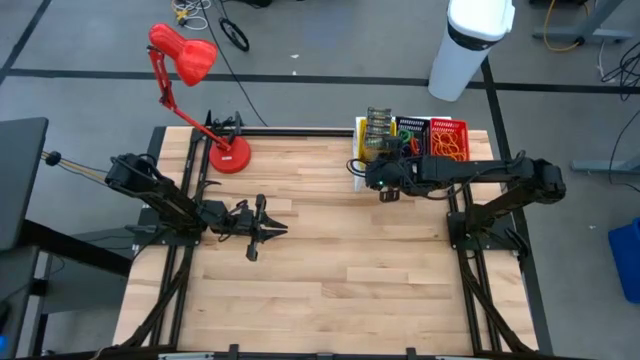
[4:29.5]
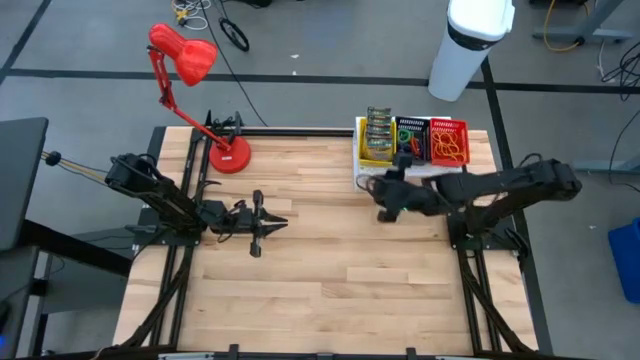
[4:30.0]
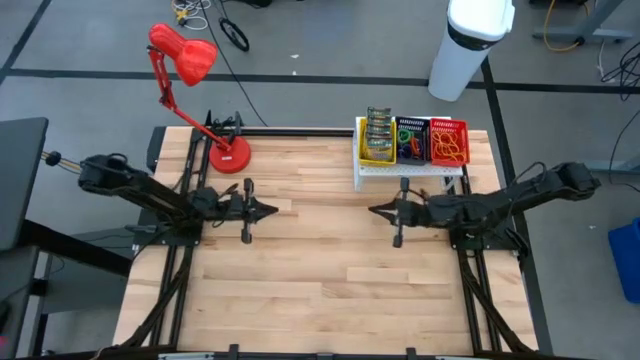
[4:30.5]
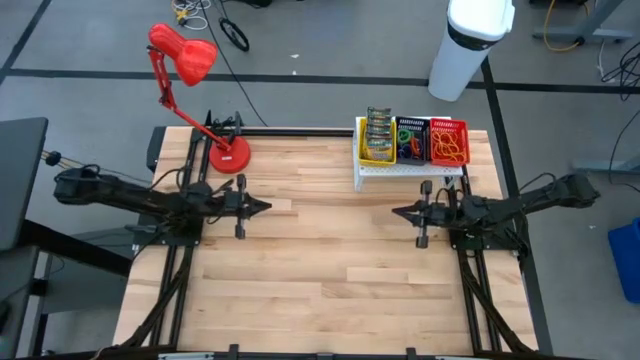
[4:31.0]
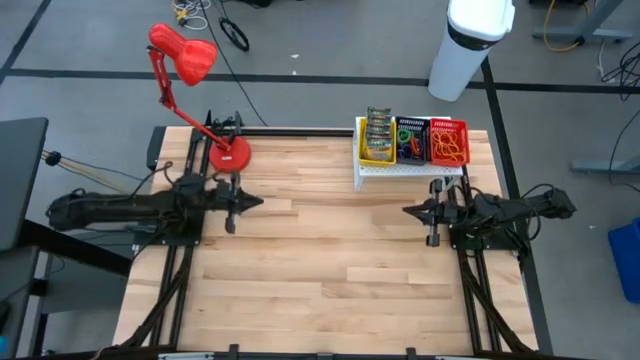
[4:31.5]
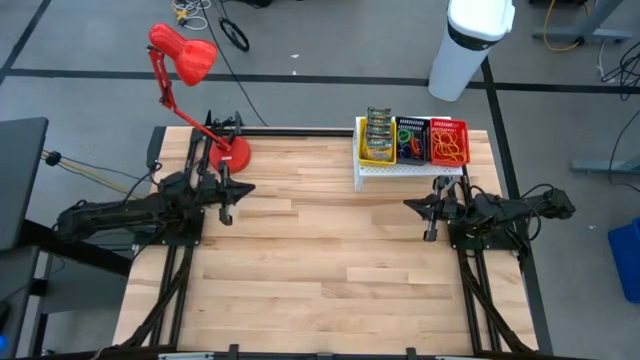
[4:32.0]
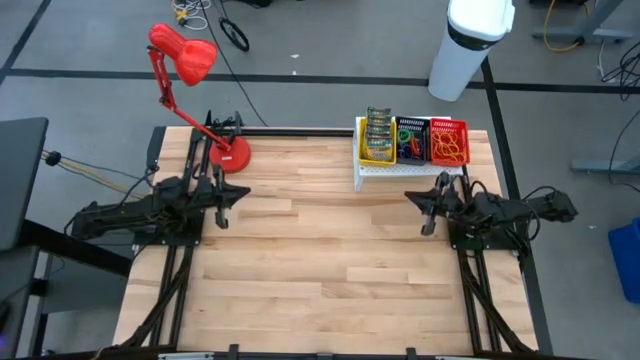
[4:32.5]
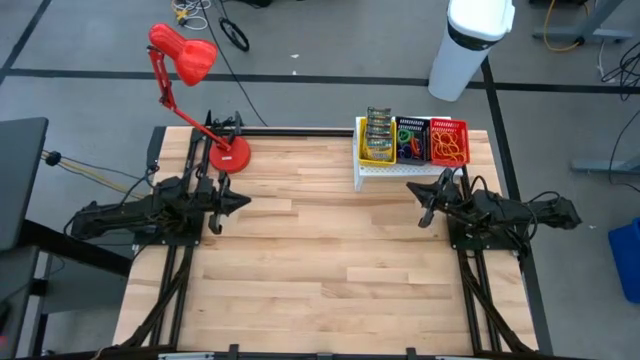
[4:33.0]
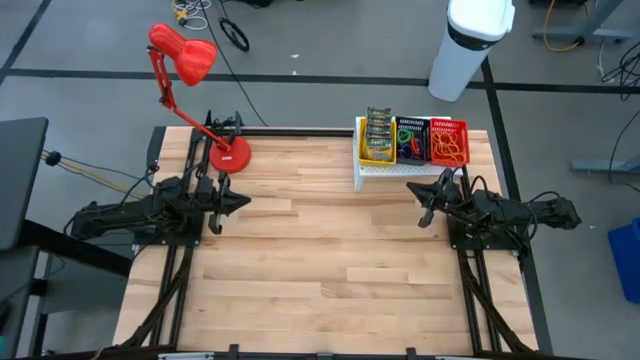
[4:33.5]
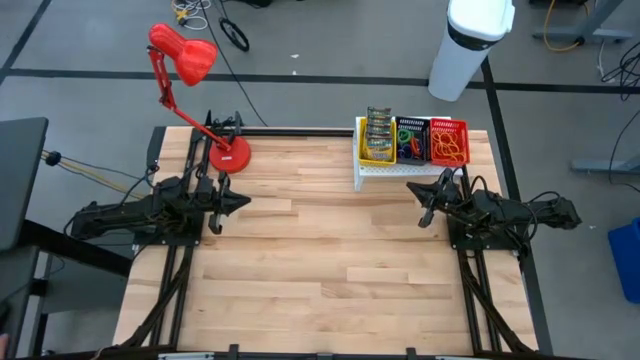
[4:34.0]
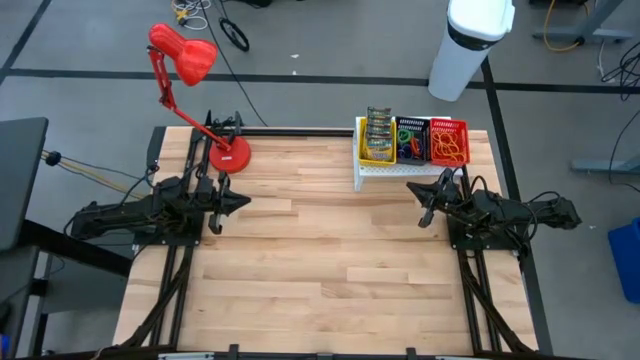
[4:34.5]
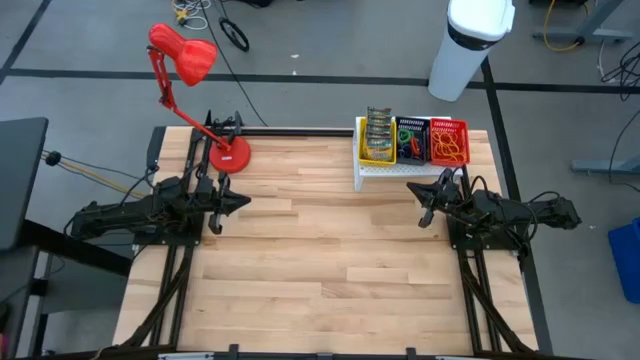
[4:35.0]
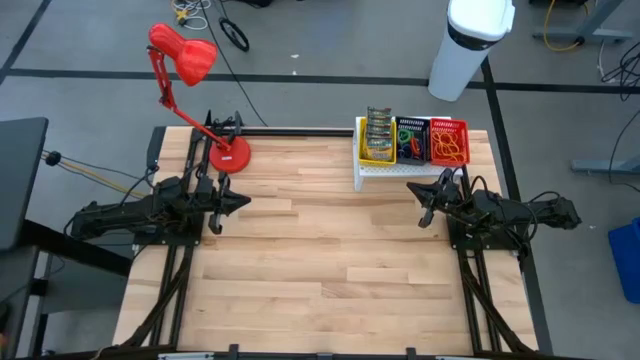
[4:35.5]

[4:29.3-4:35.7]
Task: Pick & Place Office Desk Supplies
Return to Home Position

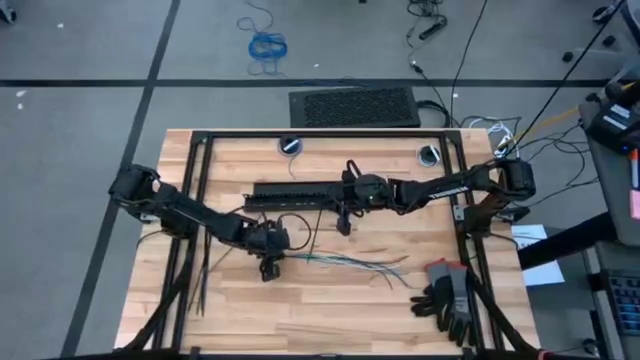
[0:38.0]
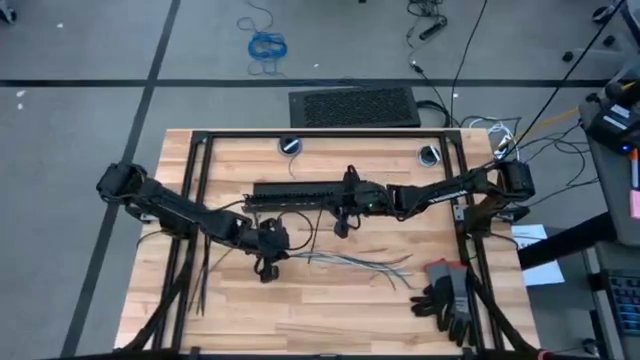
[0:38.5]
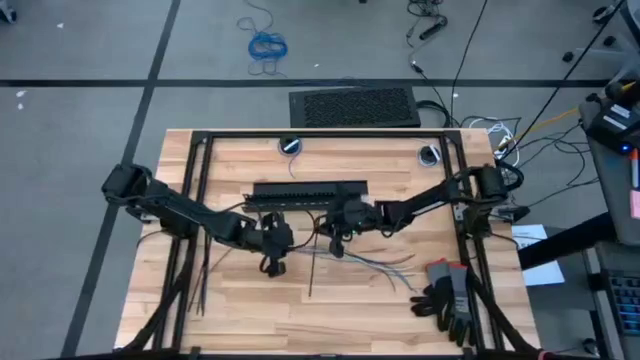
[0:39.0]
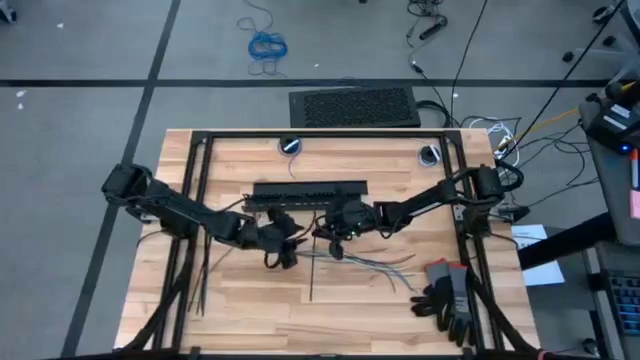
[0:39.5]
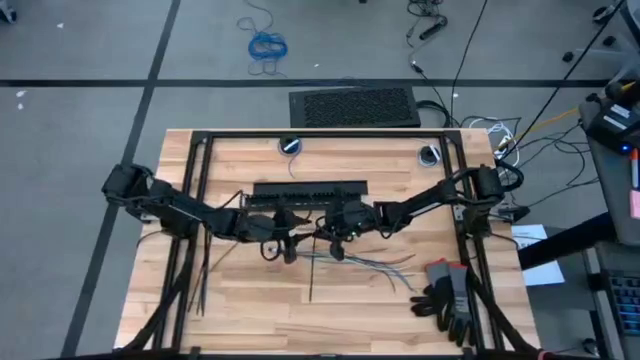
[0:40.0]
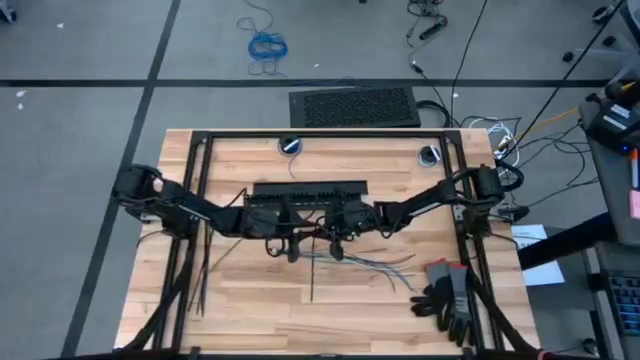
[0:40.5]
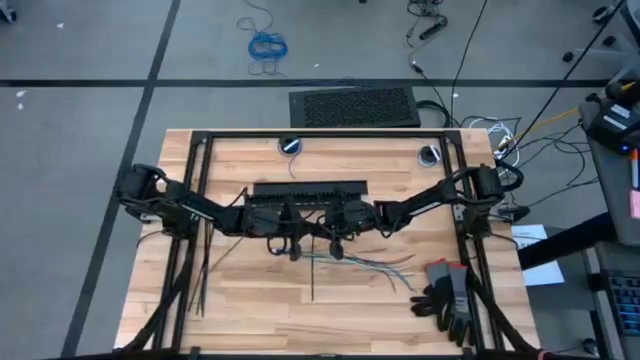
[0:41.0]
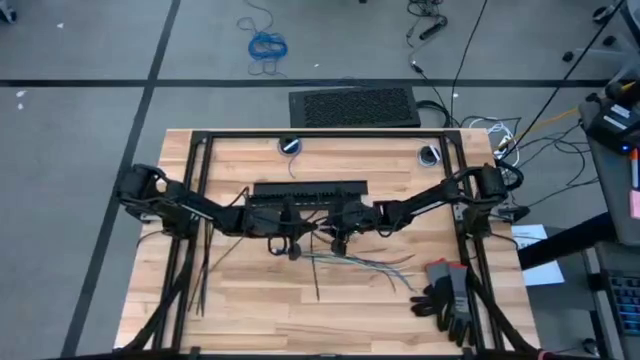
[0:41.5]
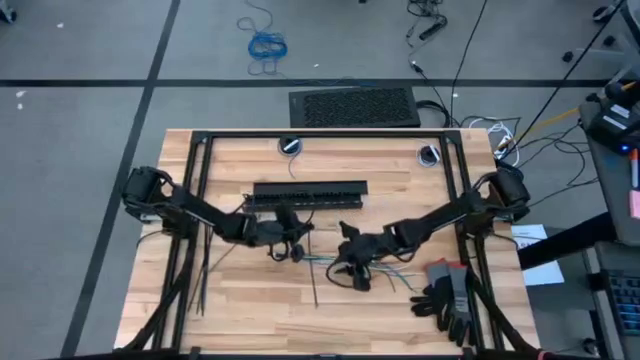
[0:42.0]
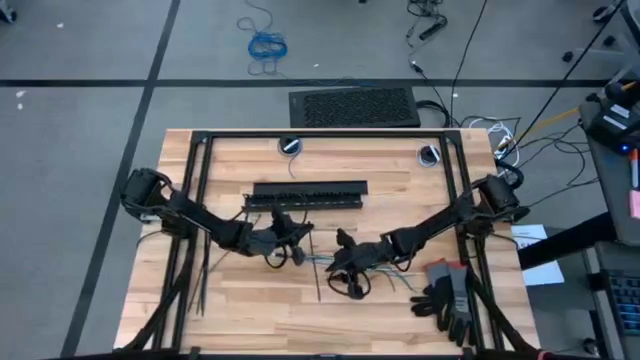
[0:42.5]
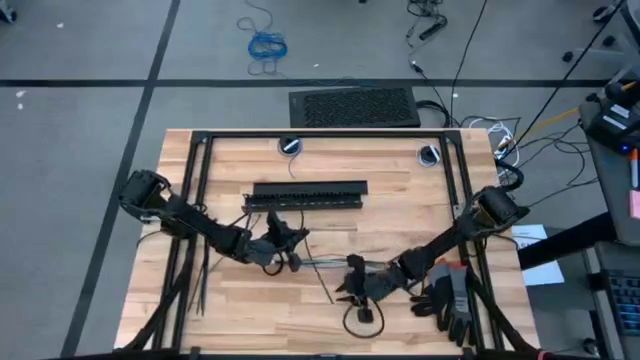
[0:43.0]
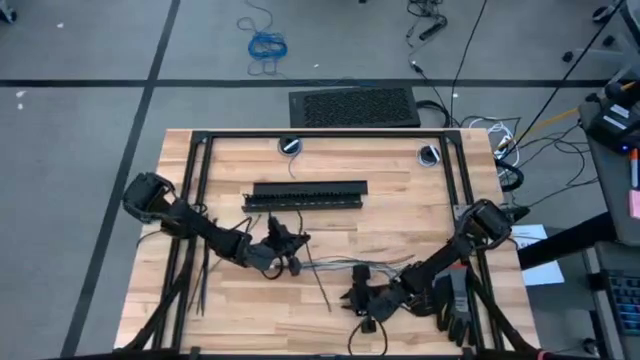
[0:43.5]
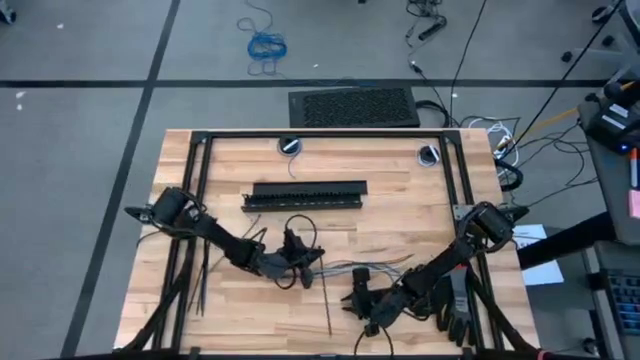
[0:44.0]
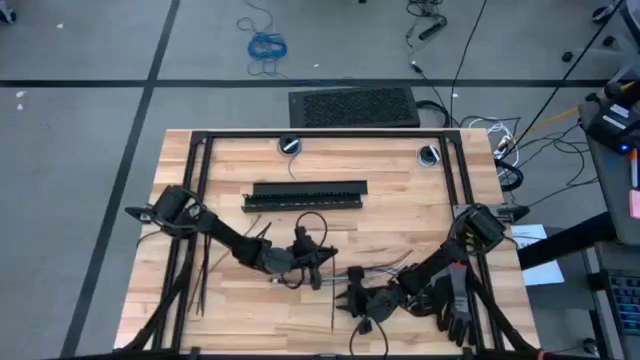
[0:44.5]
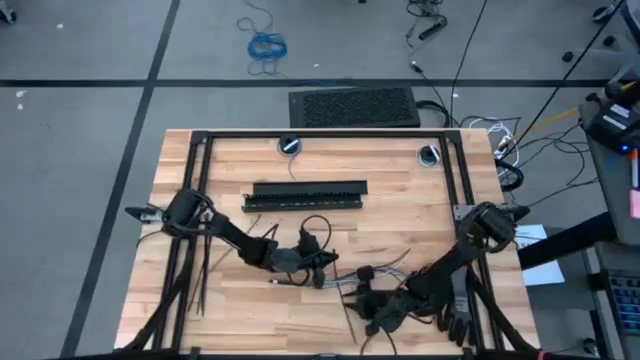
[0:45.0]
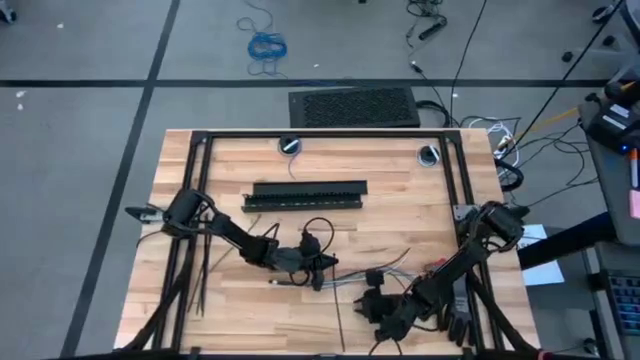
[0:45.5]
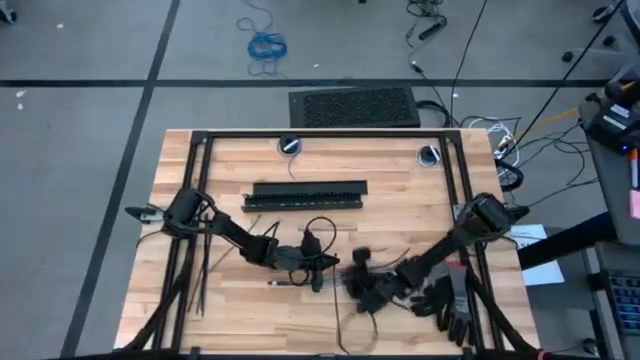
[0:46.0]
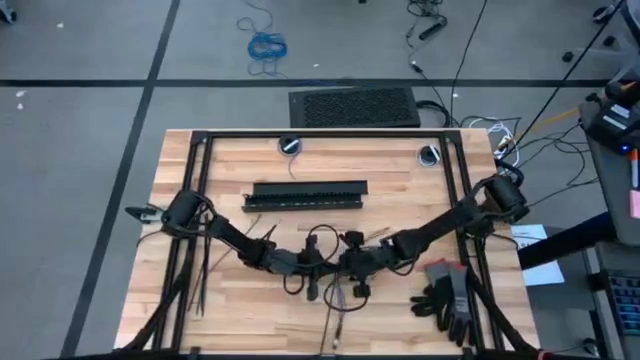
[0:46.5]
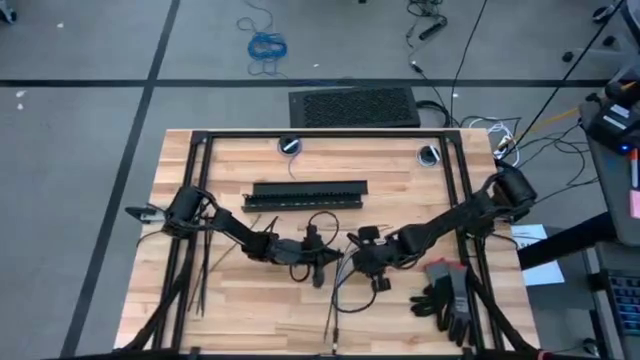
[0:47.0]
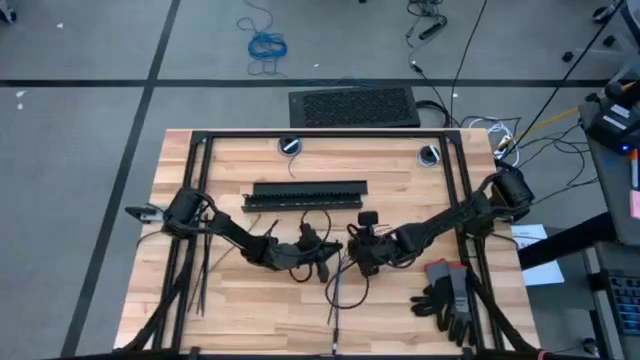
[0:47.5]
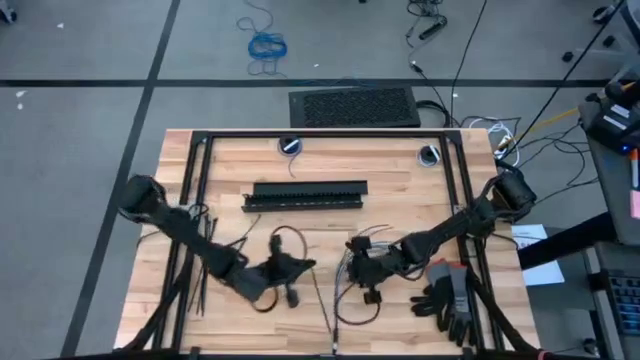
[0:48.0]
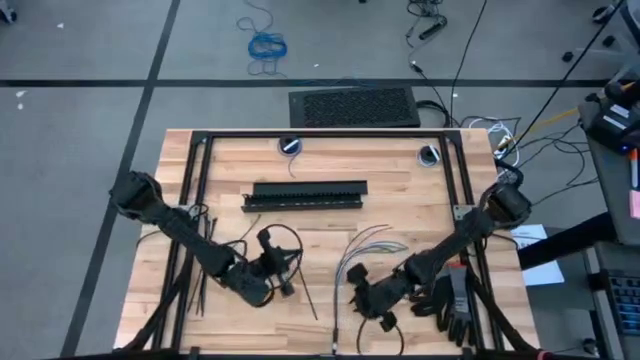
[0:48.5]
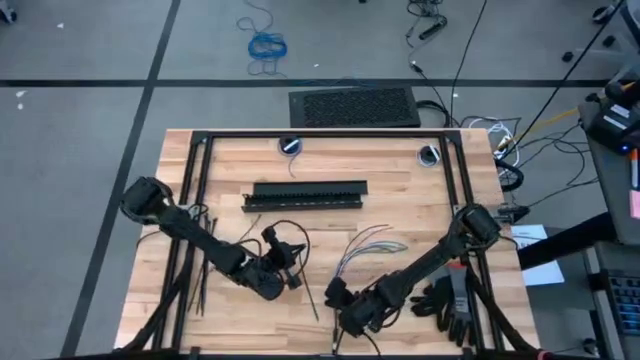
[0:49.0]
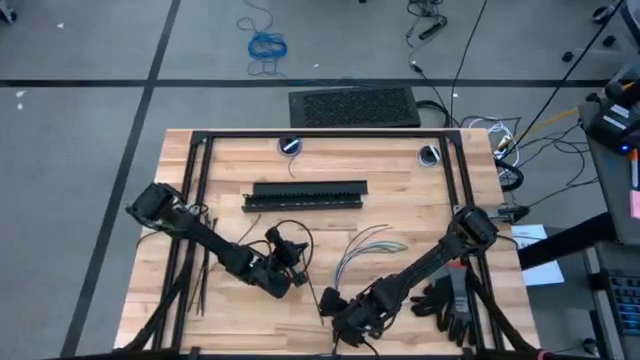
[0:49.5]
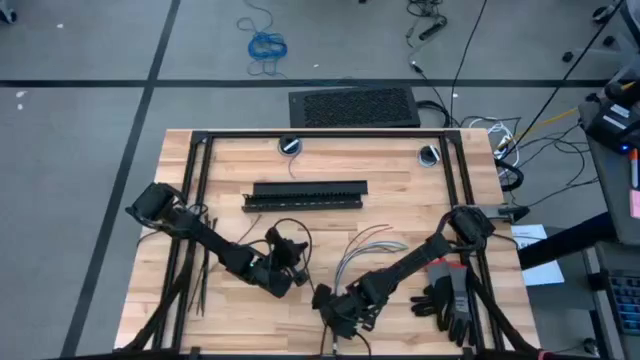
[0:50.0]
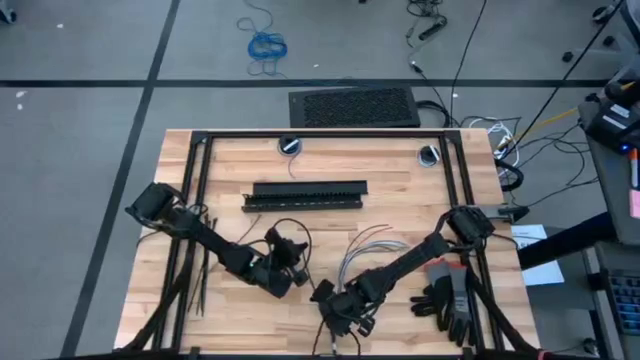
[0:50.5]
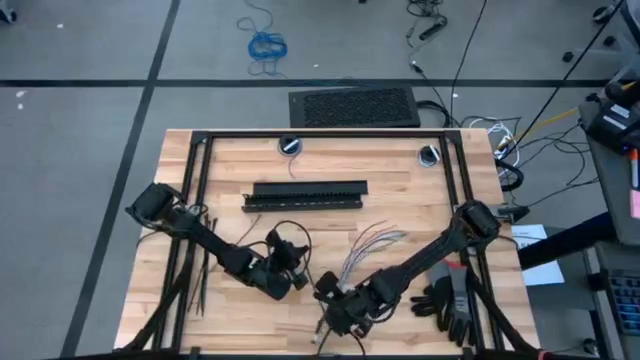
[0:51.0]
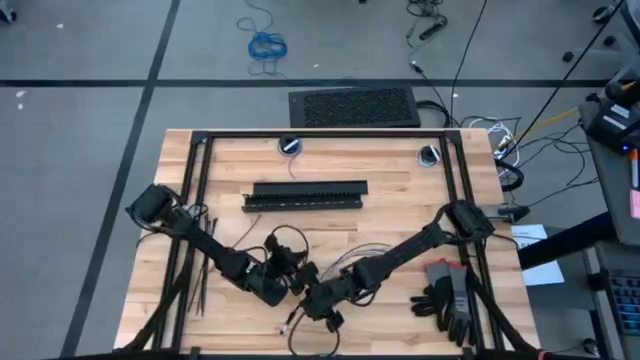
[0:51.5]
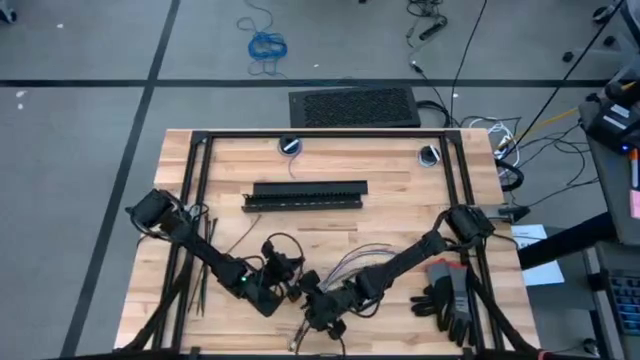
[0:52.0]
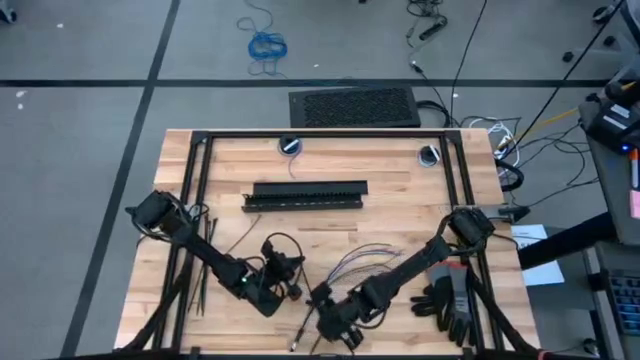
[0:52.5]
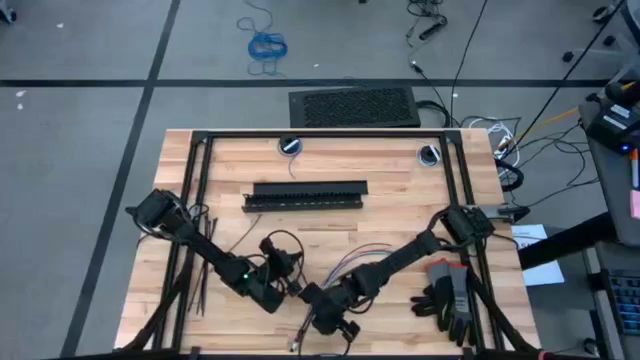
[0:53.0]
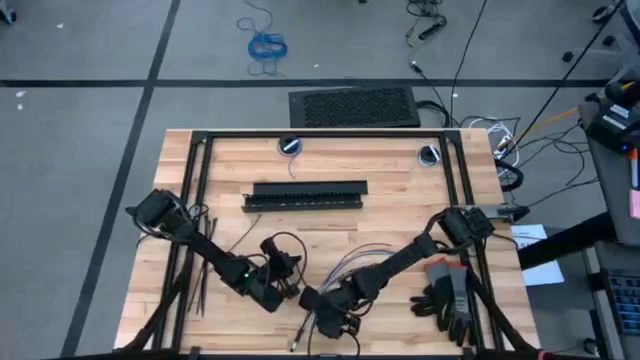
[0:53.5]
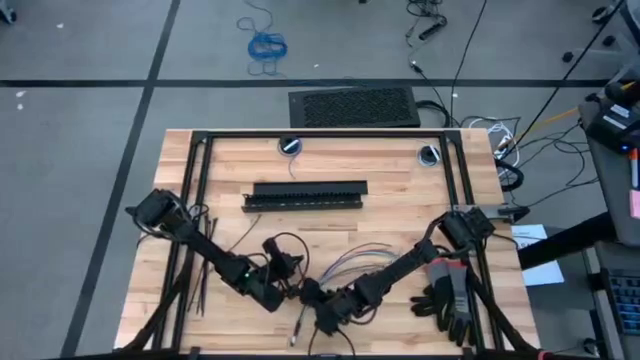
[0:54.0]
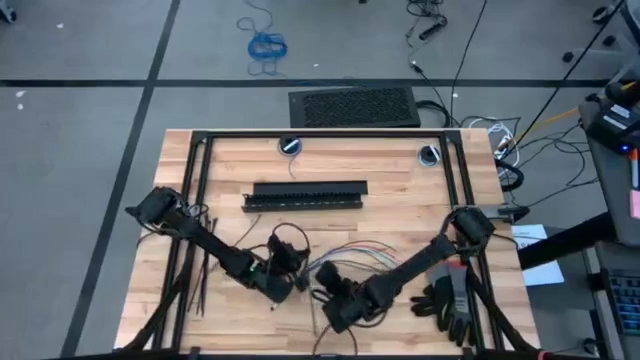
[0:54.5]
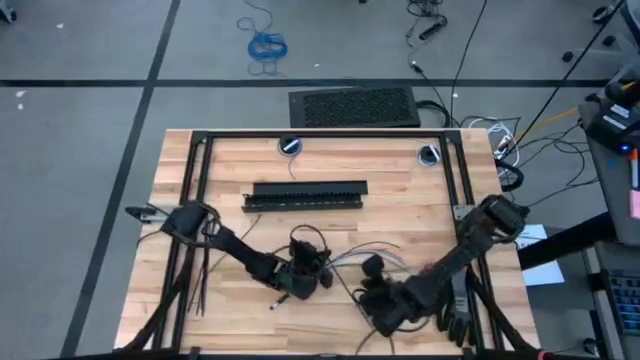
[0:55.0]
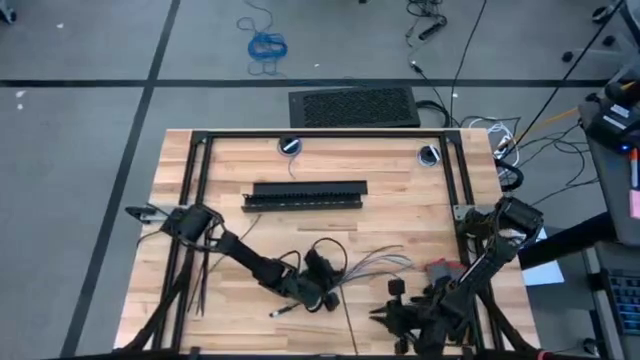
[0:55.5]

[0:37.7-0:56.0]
Task: Ziptie cables
Wrap the cable wires with zip tie
